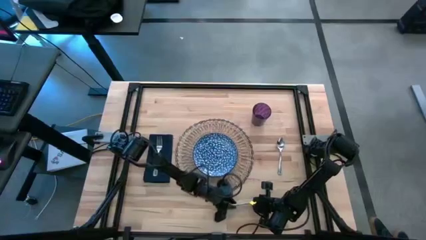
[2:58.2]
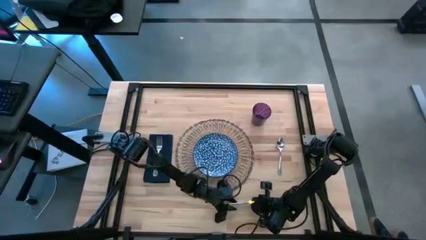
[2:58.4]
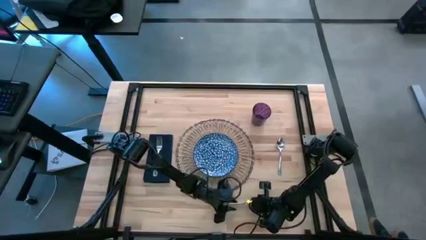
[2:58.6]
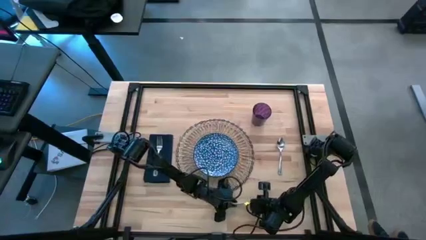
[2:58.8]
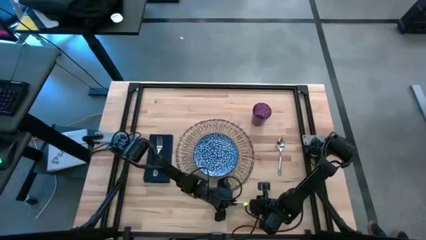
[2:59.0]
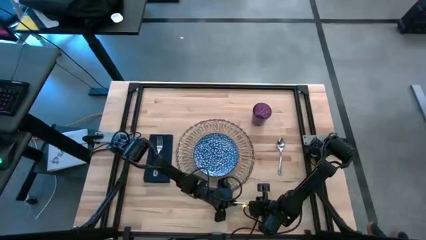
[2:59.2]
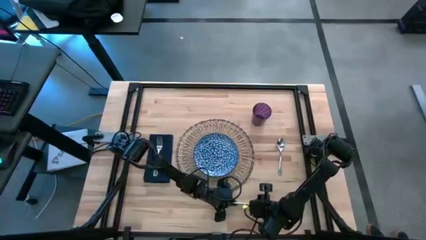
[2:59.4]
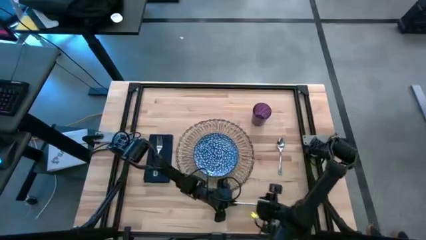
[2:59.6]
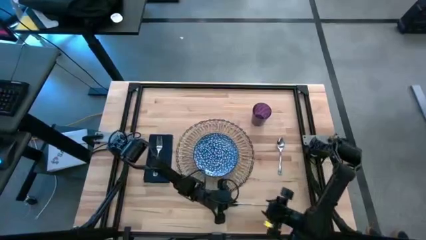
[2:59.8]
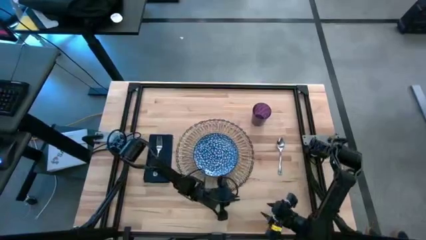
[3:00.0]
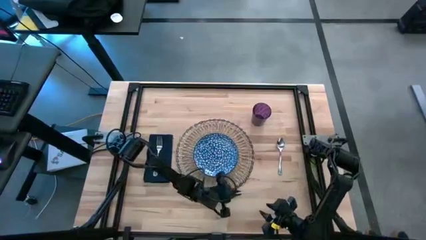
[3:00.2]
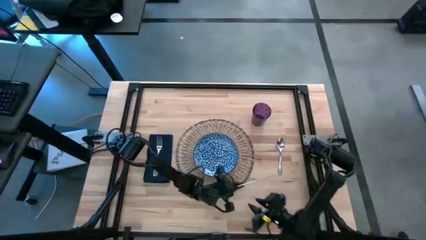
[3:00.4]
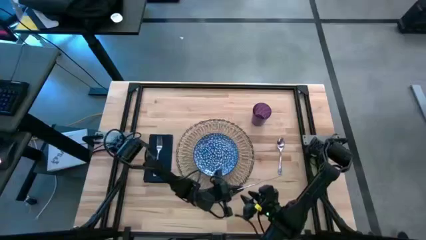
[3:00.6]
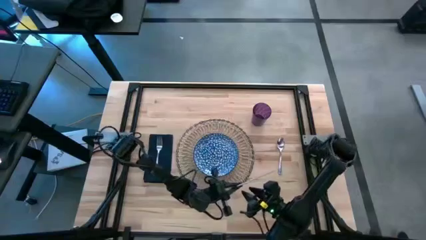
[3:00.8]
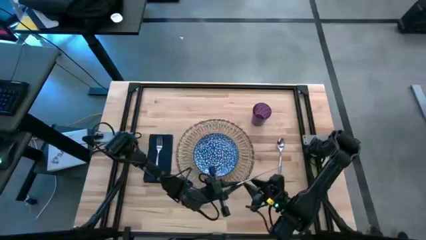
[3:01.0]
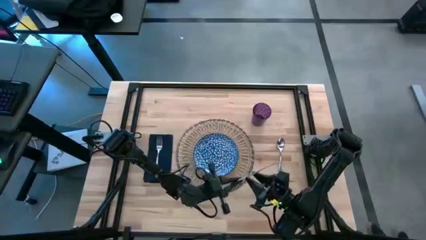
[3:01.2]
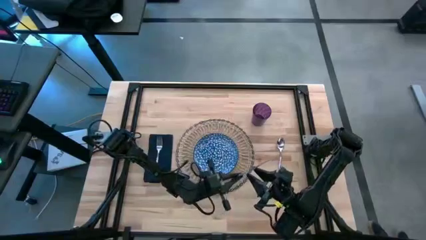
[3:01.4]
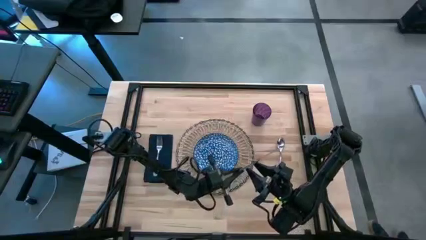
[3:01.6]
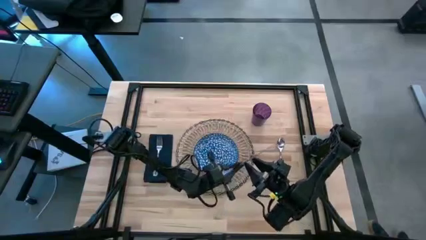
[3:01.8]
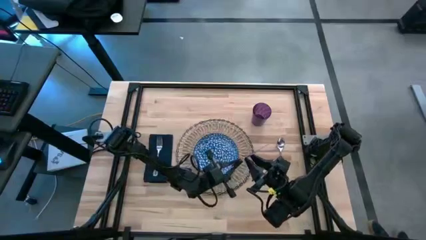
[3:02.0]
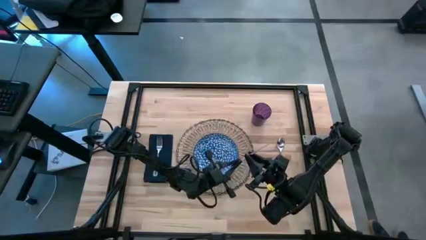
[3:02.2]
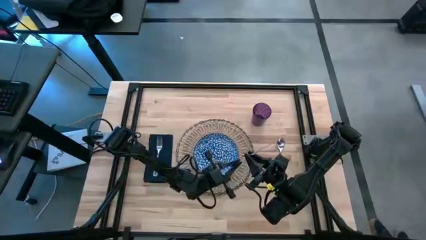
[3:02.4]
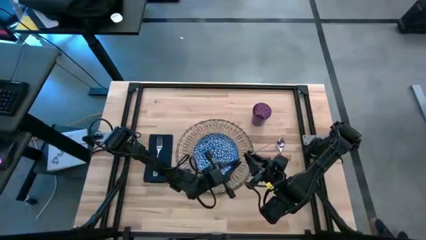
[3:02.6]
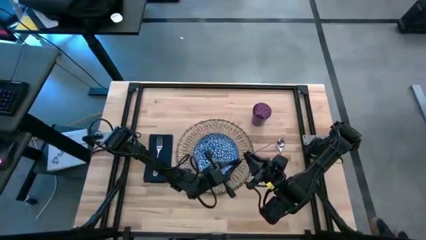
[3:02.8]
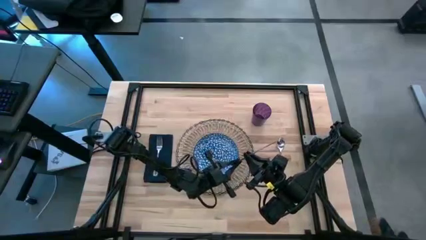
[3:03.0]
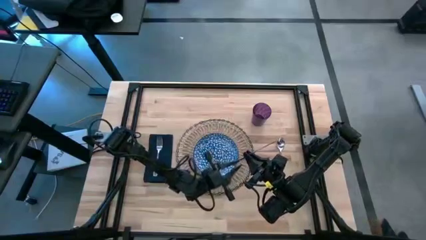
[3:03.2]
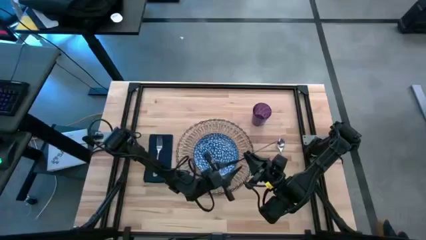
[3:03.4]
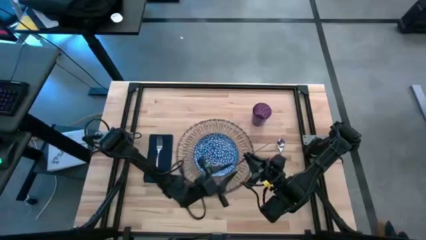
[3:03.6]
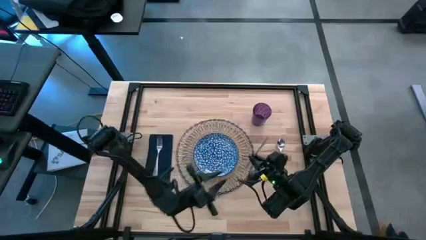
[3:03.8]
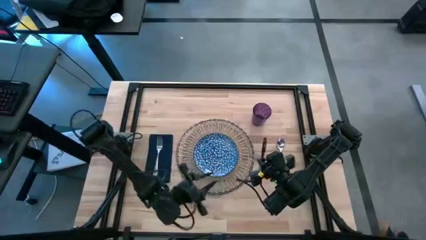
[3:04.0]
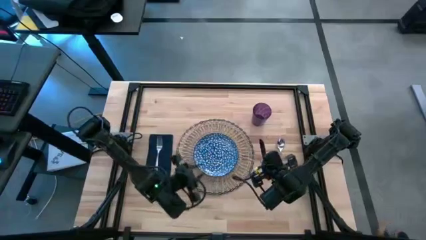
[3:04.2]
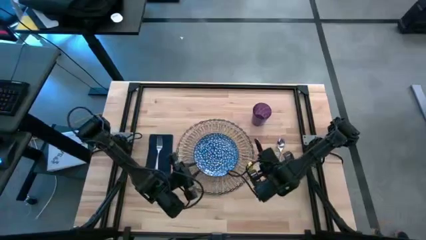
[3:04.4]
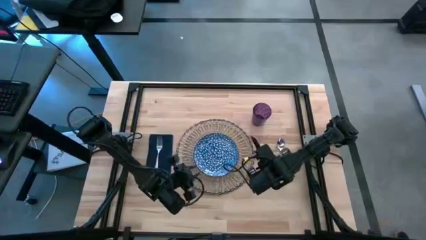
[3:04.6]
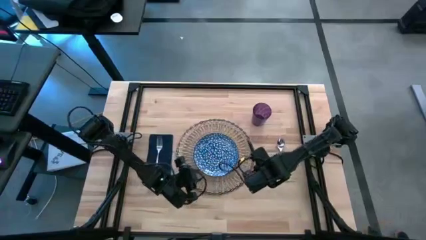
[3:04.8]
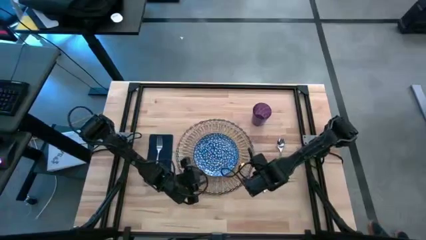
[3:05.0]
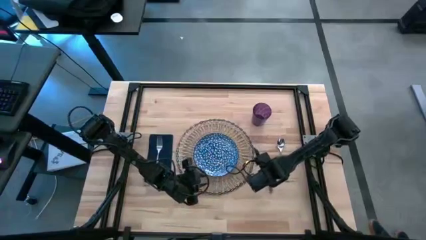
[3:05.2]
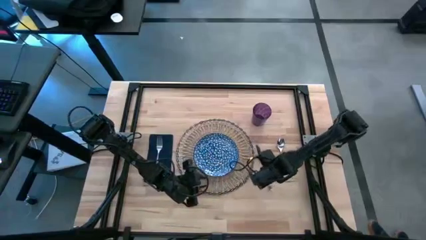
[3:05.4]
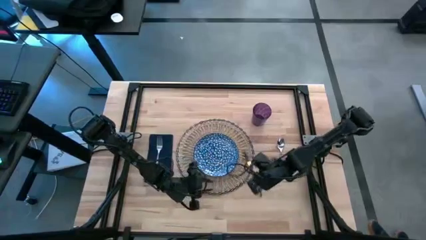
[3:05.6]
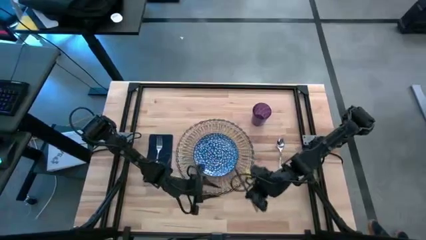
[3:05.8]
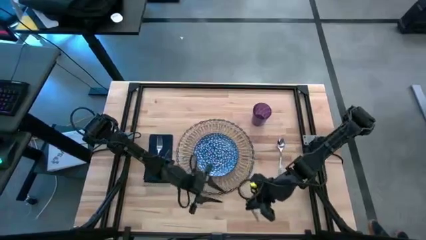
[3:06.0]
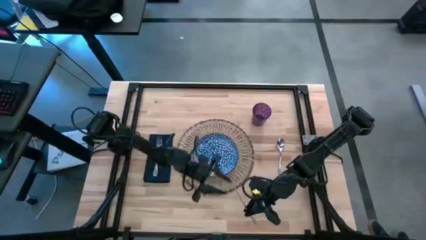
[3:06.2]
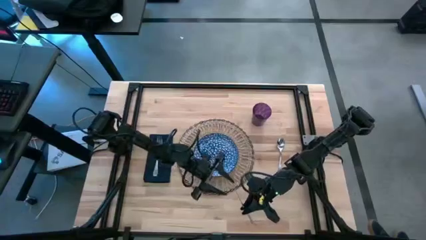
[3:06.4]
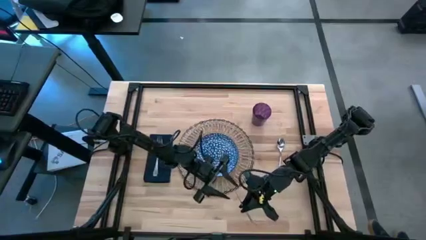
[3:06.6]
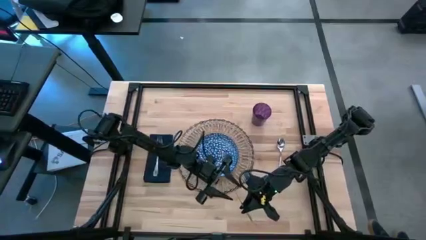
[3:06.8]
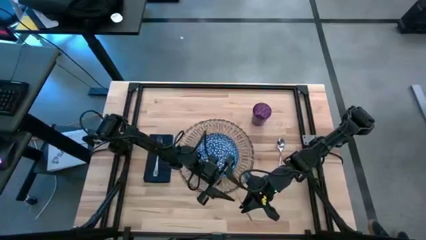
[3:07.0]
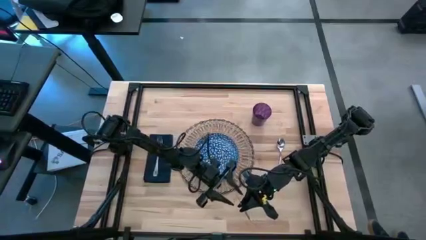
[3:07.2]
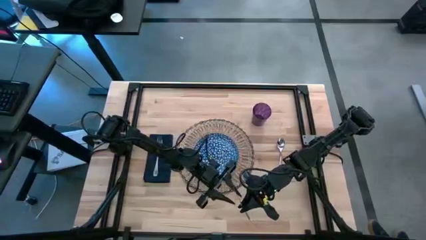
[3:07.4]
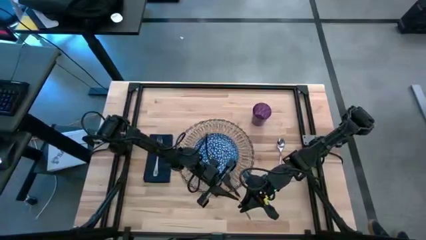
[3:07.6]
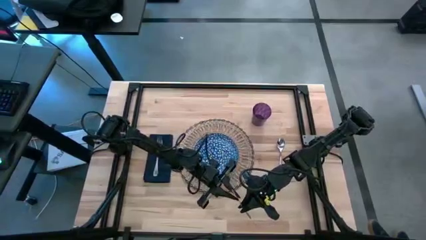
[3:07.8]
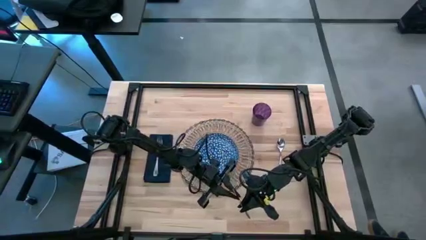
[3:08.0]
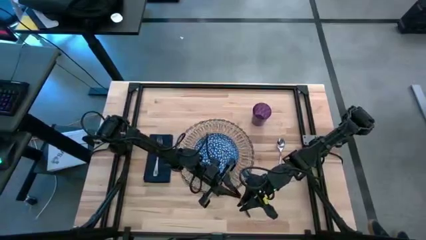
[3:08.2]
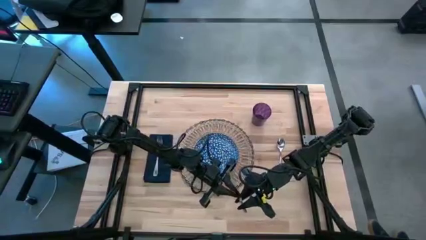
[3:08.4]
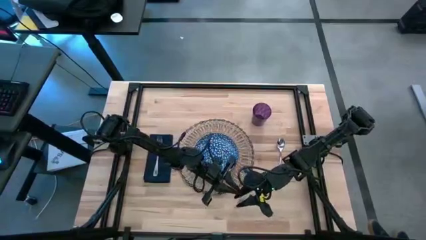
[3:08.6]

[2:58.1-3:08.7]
Task: Set table place
Move the silver knife to the left of the silver spoon on the table

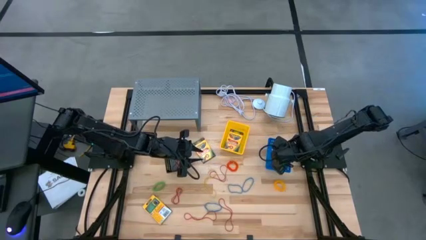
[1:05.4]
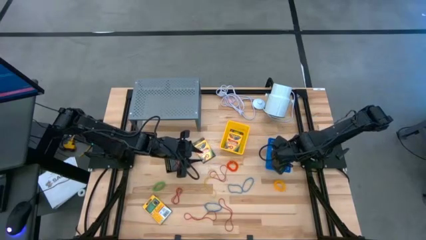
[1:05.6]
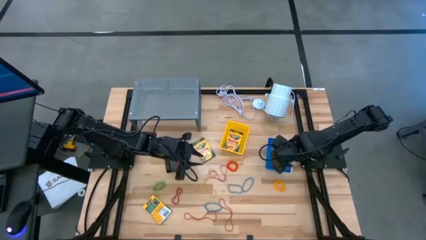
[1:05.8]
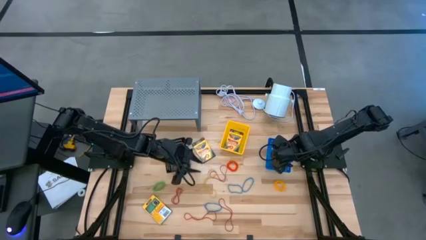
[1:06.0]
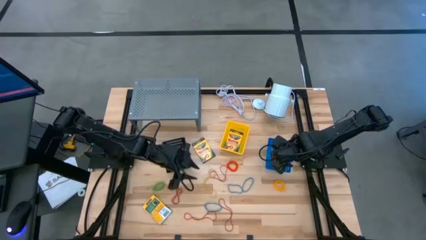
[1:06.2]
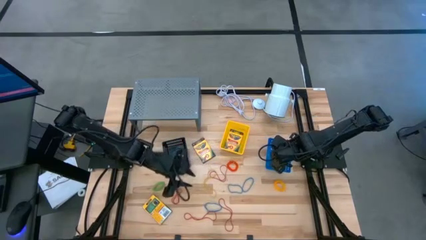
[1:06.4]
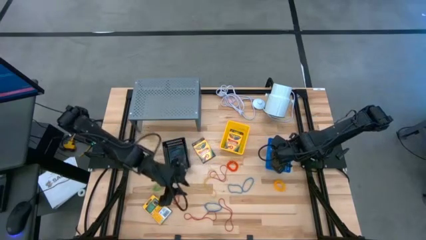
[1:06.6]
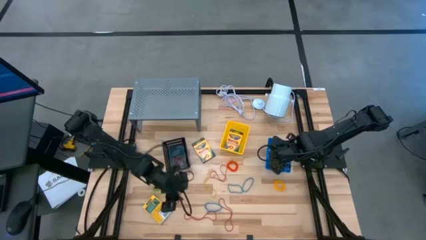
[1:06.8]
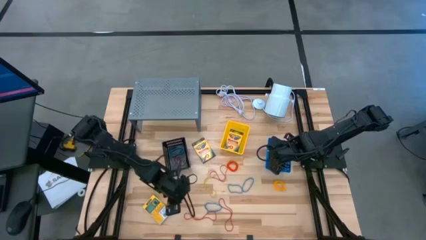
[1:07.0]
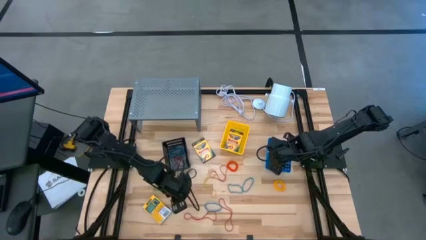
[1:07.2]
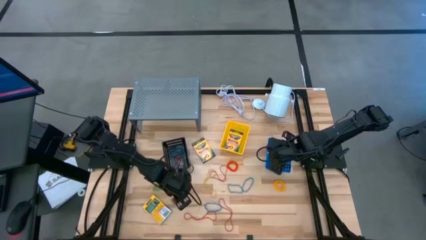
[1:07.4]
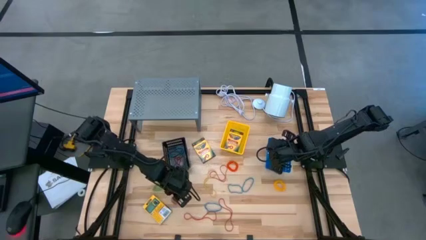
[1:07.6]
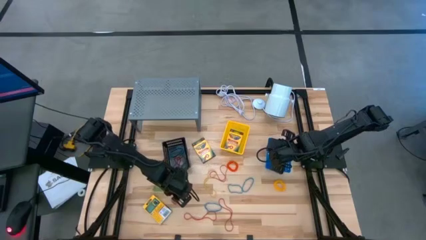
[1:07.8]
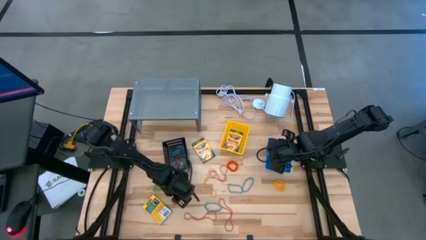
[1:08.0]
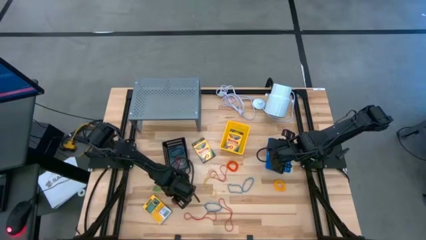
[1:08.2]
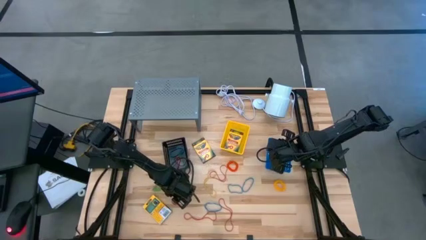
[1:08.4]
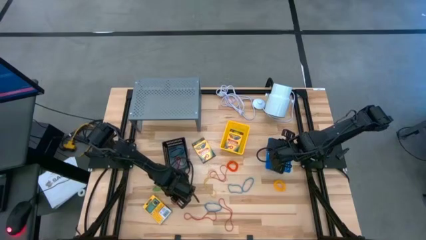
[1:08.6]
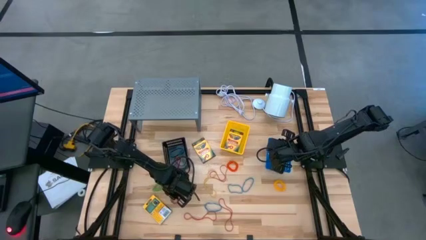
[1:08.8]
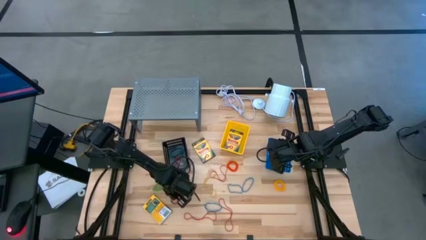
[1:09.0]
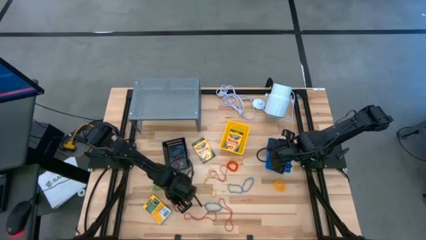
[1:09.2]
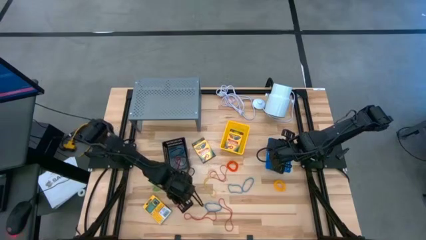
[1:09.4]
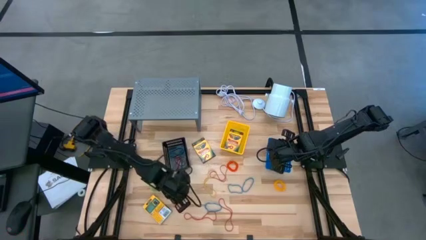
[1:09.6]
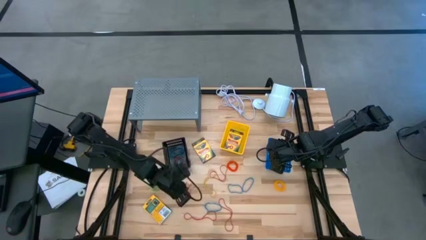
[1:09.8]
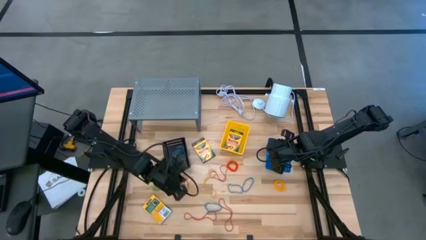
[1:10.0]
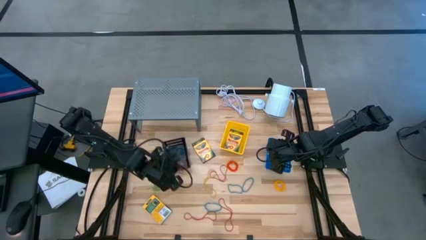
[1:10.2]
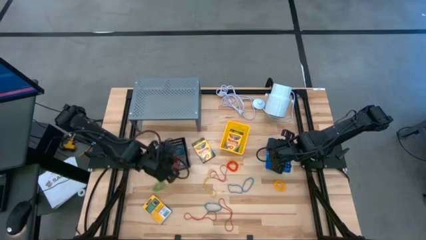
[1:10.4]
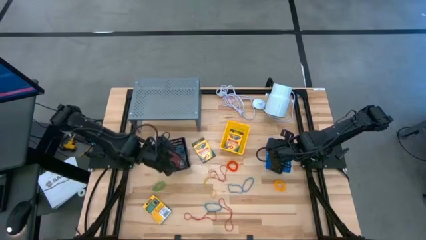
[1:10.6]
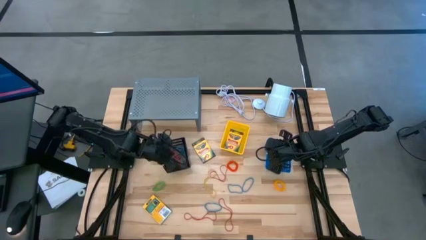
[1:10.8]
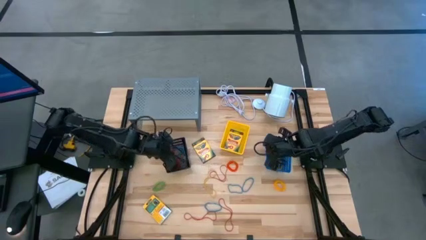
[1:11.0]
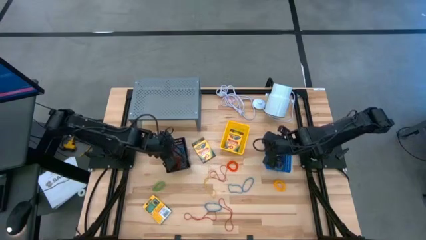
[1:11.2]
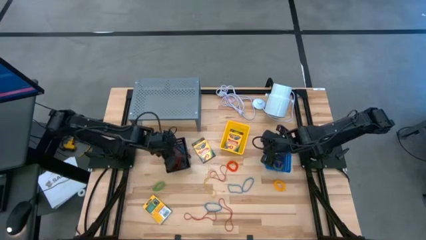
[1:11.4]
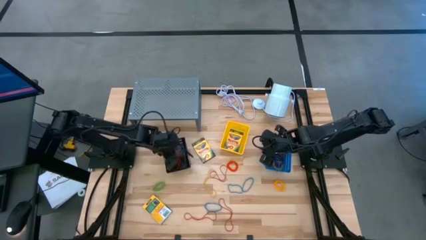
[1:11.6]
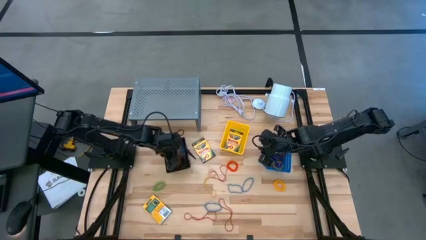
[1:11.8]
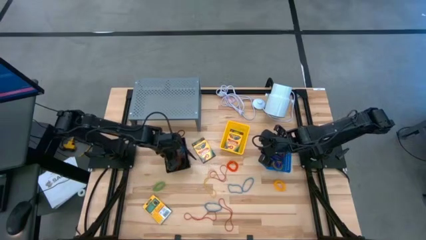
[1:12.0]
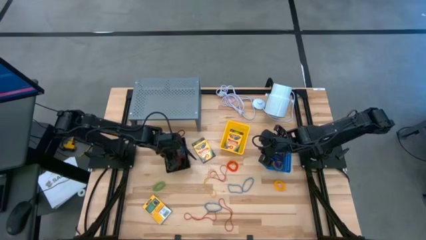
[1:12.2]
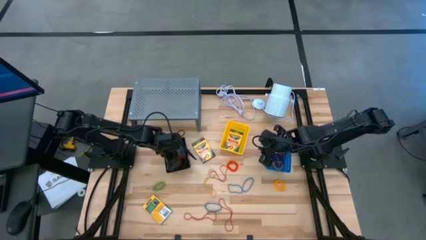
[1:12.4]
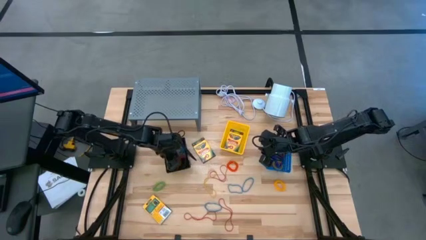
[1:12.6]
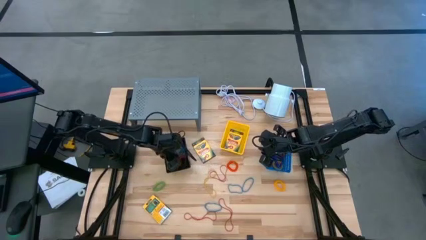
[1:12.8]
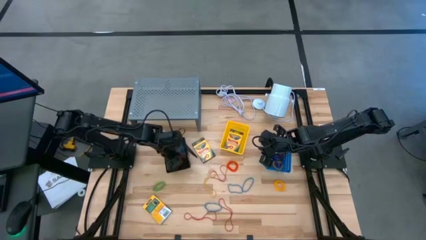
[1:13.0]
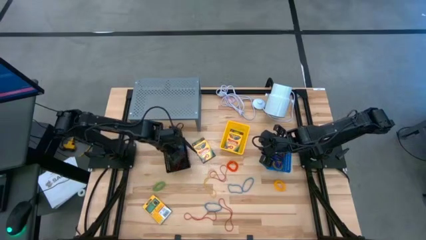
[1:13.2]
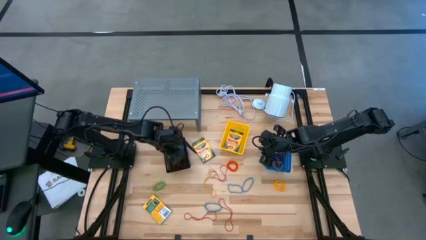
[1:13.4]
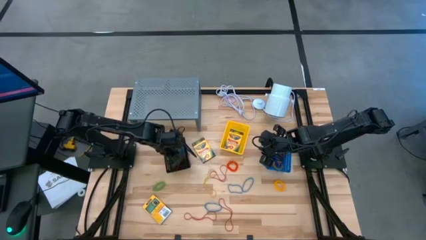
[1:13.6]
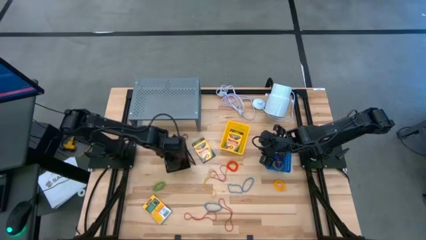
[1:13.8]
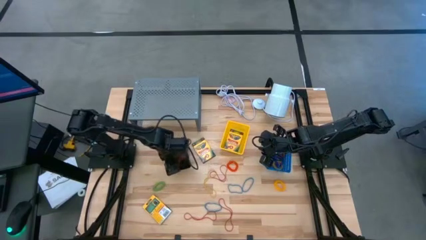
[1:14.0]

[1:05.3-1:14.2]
Task: Pick & Place Office Desk Supplies
Put the red rubber band into the black bin
